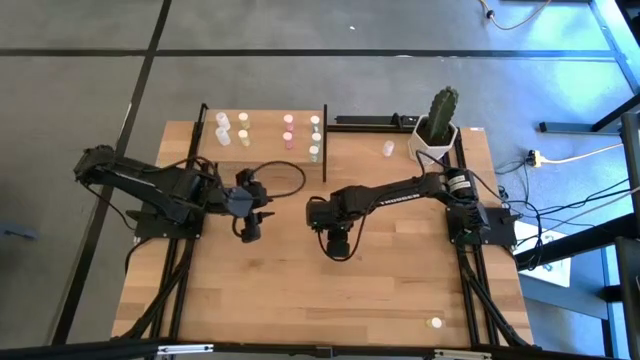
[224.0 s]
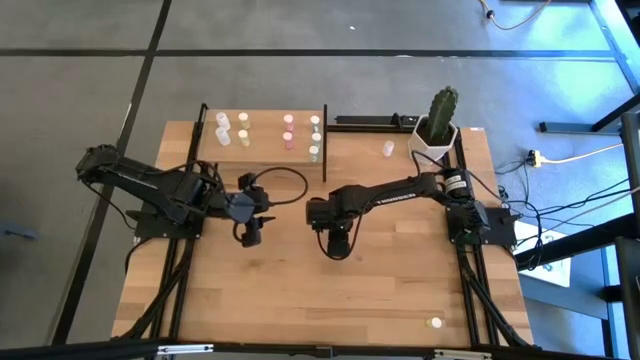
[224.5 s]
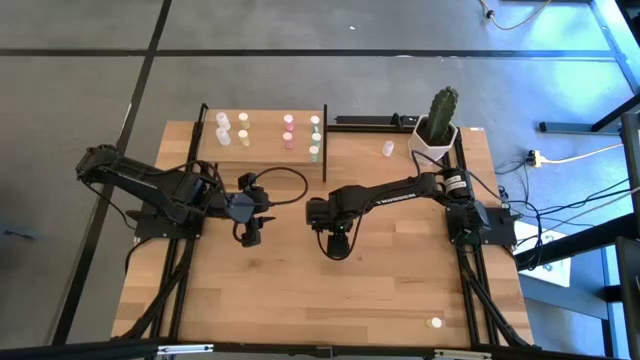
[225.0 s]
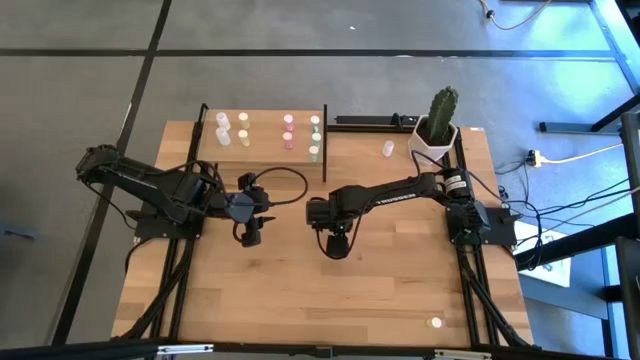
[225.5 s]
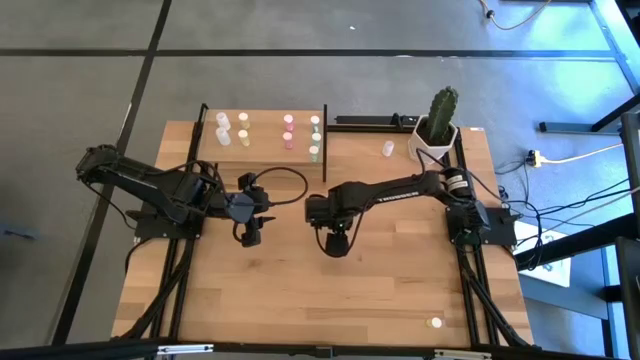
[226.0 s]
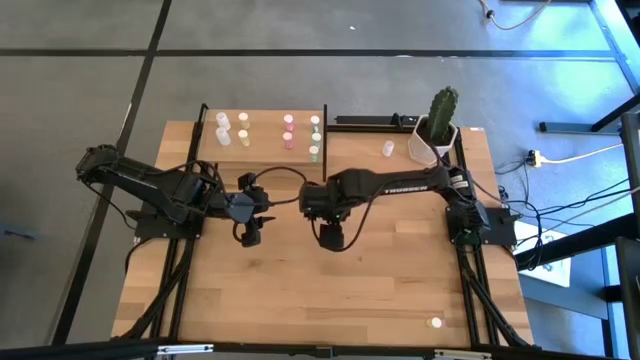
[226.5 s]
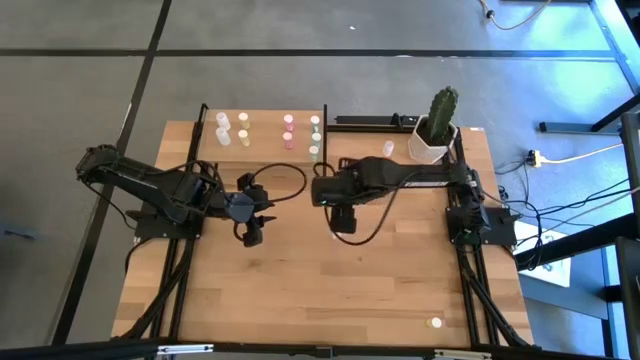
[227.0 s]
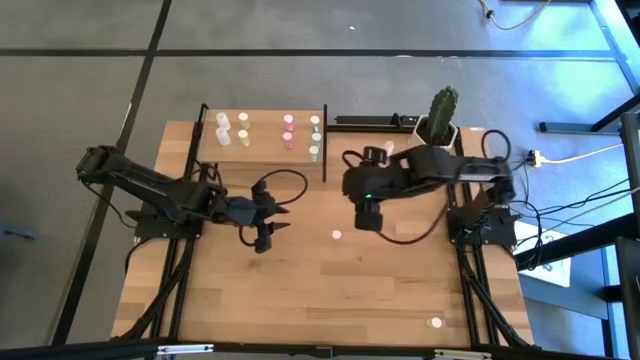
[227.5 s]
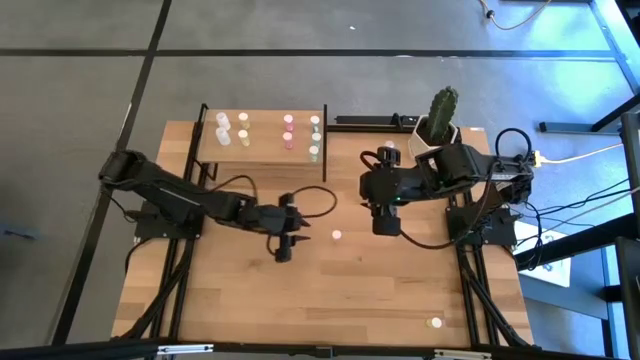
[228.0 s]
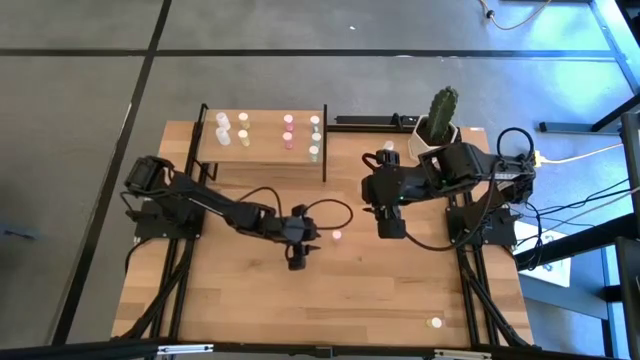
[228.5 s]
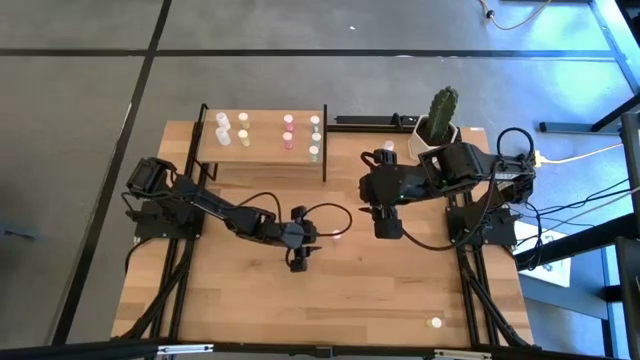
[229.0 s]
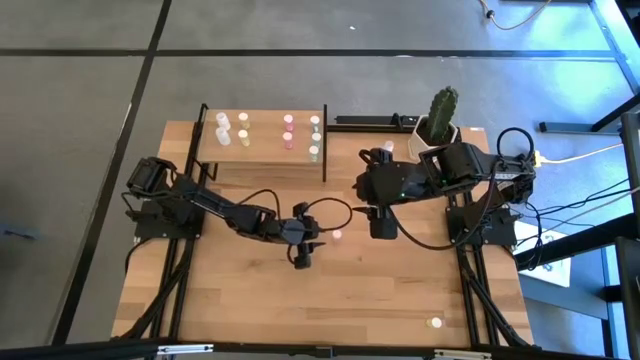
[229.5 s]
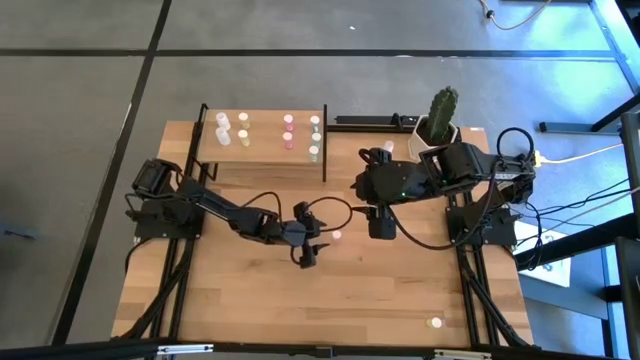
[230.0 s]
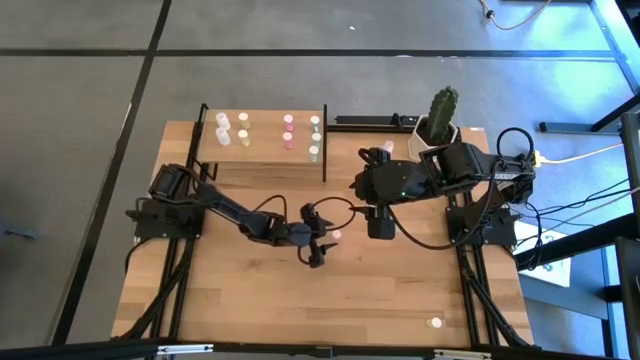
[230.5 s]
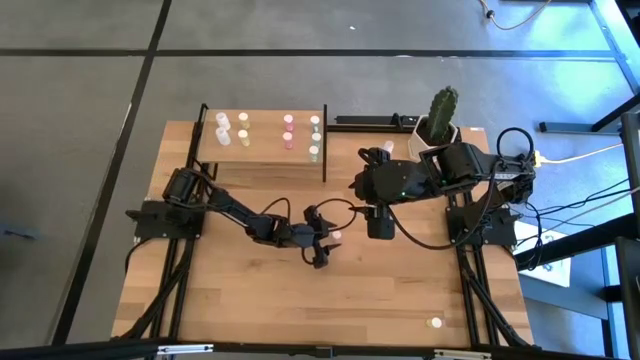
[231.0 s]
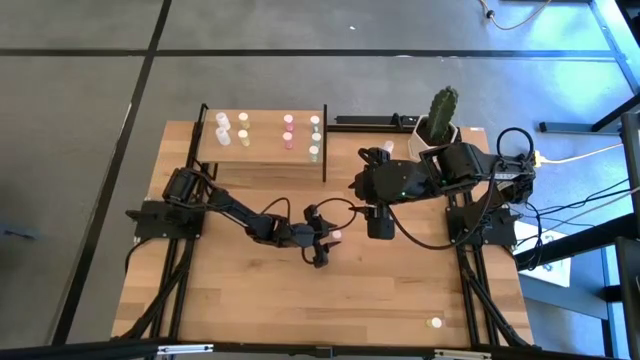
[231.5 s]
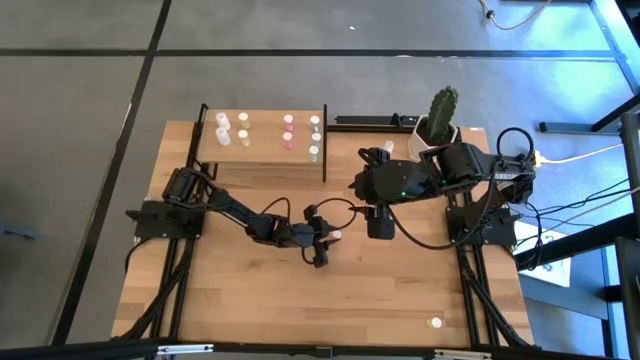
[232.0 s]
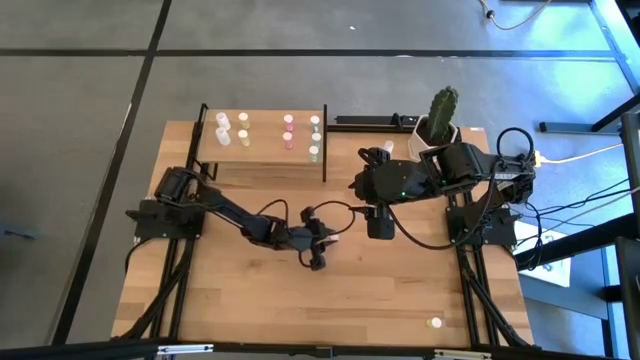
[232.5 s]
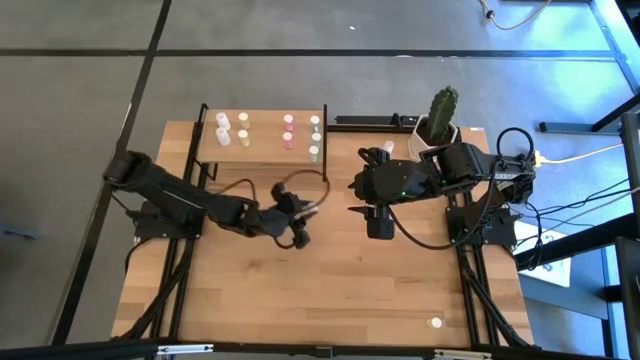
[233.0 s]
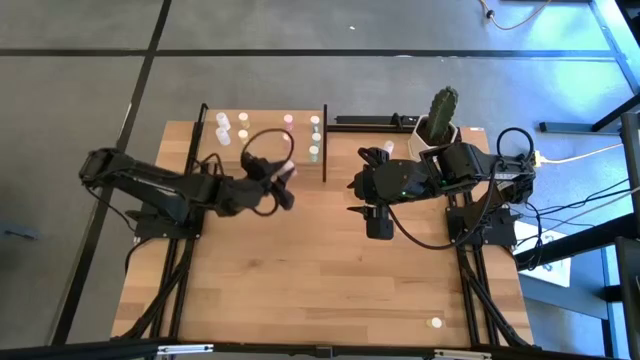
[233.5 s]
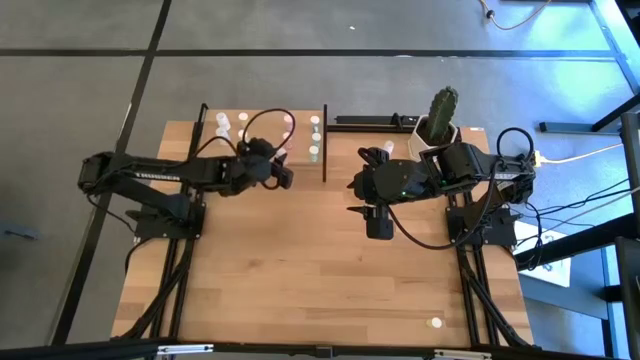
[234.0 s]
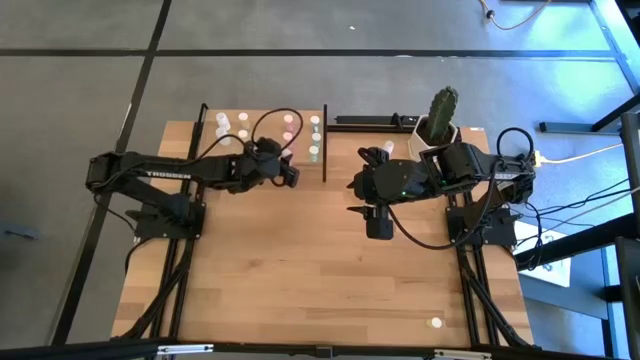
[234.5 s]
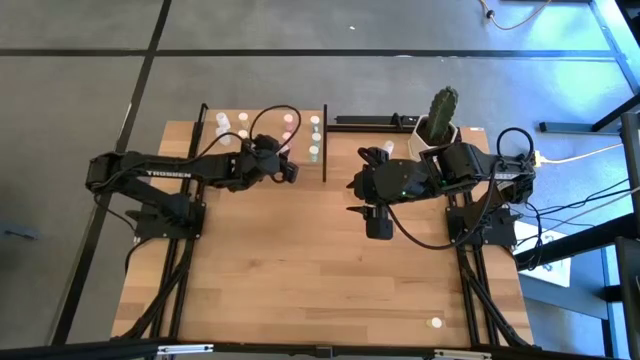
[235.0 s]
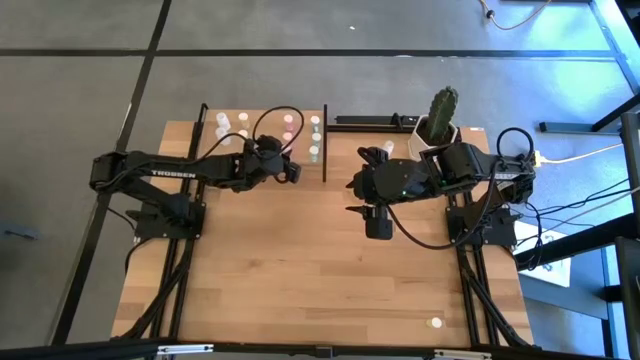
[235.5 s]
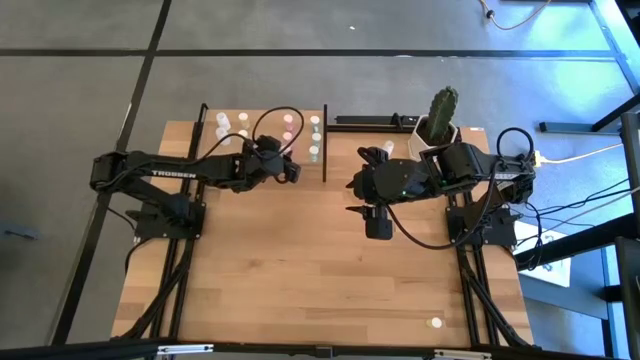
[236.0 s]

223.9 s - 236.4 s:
Task: Pick and place medicine bottles onto shelf by color
Put the pink pill bottle on the shelf and align it with the other pink pill bottles

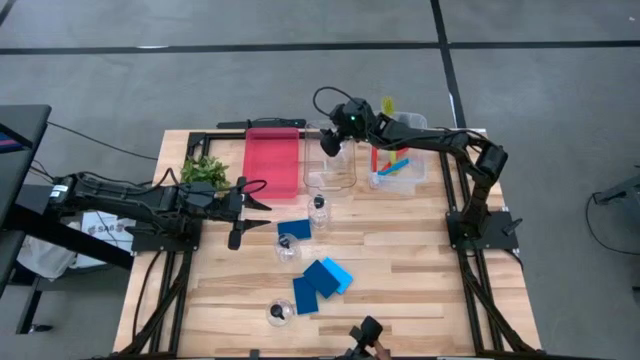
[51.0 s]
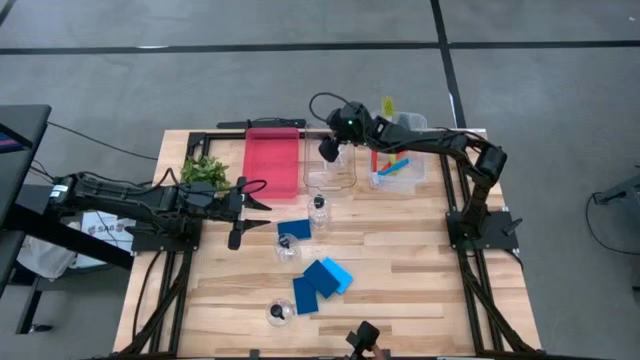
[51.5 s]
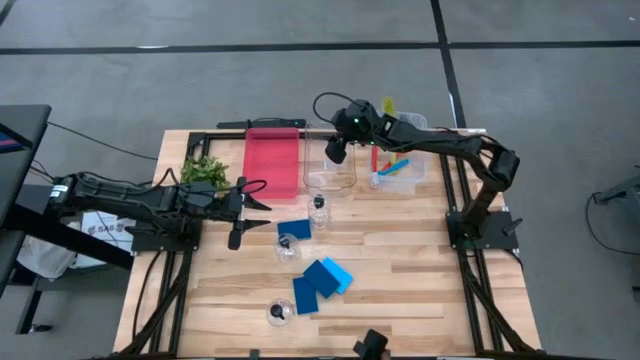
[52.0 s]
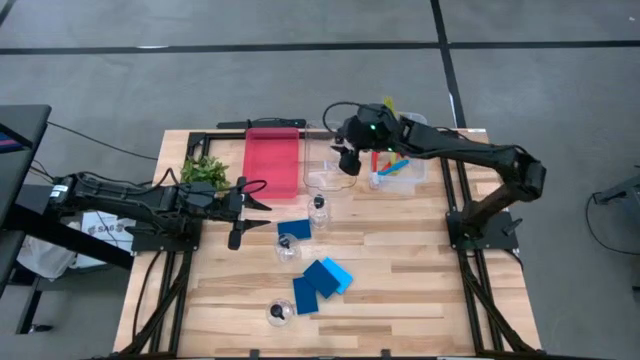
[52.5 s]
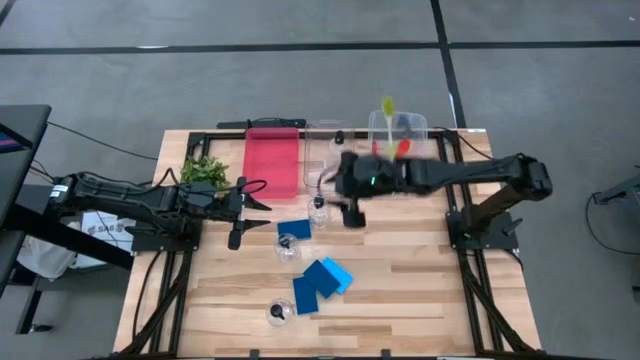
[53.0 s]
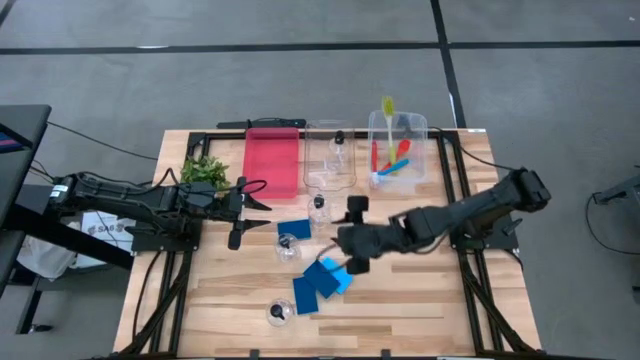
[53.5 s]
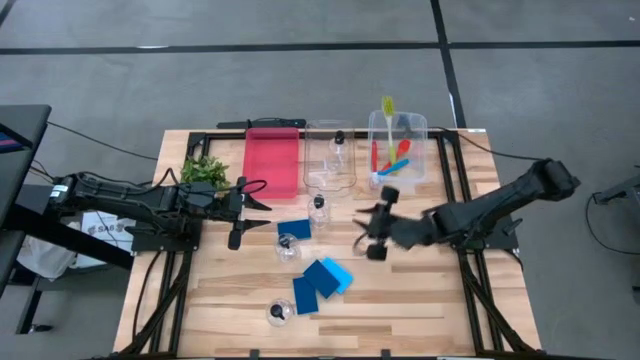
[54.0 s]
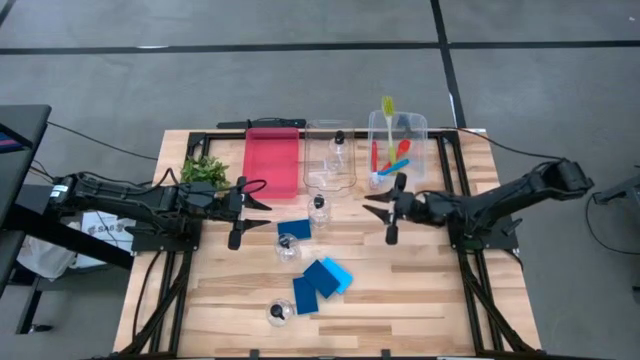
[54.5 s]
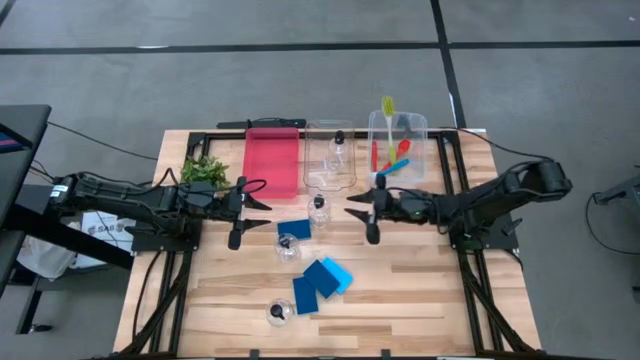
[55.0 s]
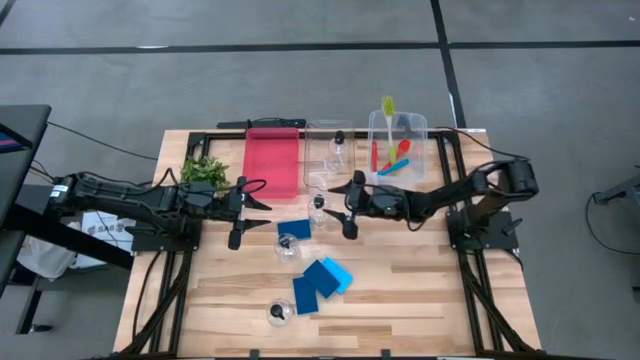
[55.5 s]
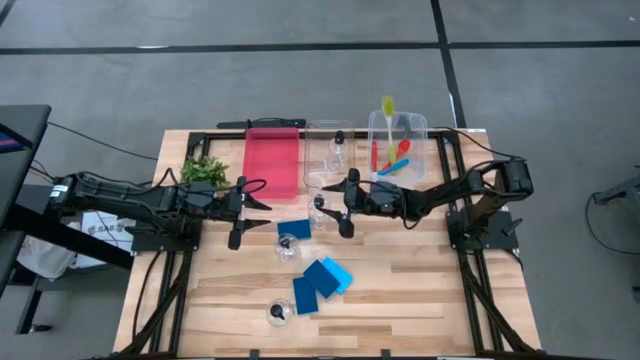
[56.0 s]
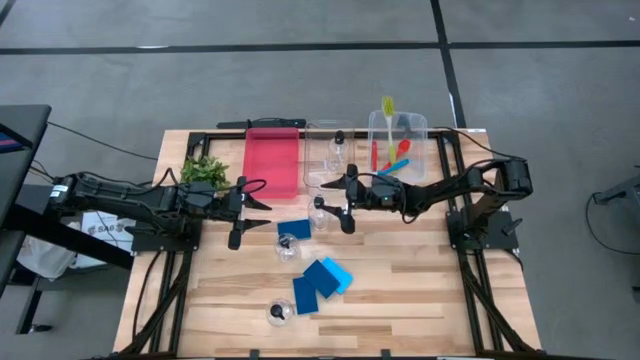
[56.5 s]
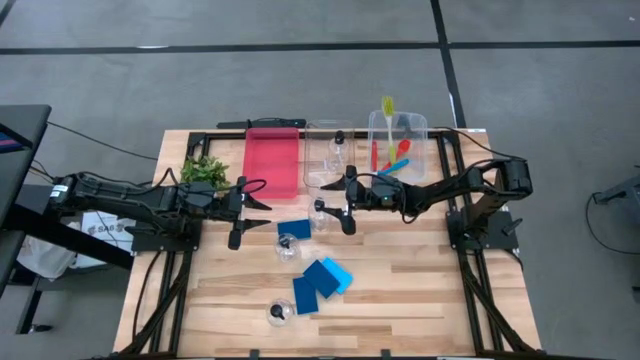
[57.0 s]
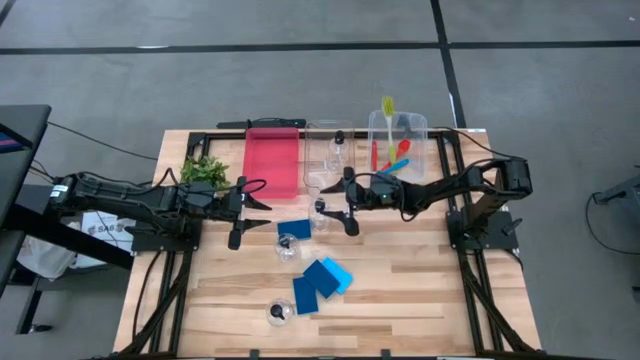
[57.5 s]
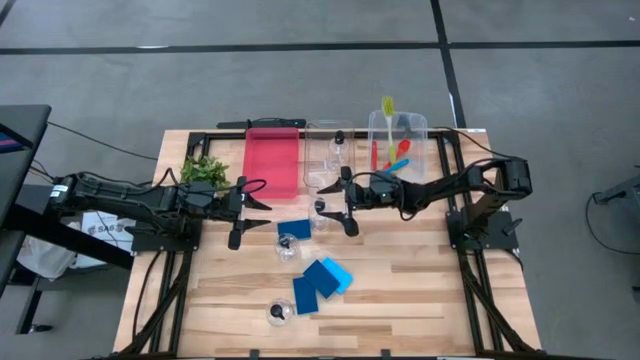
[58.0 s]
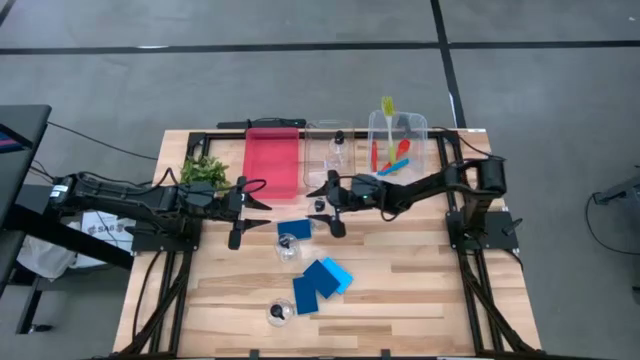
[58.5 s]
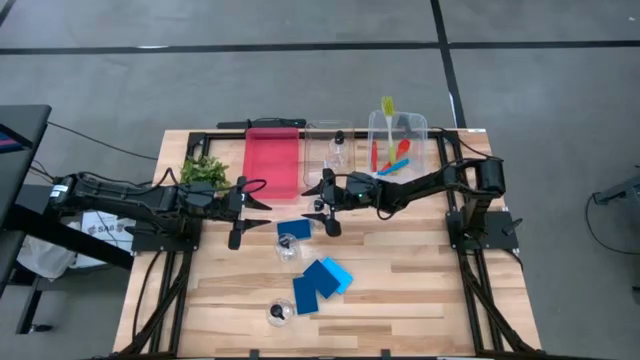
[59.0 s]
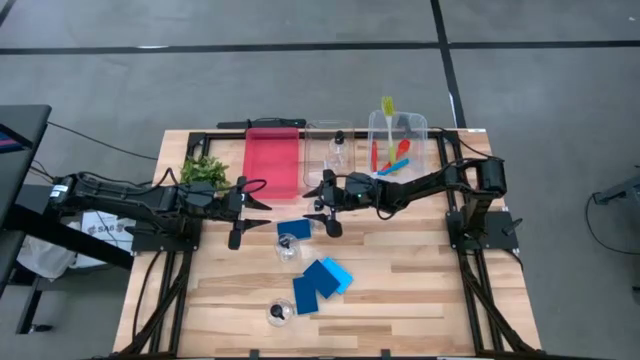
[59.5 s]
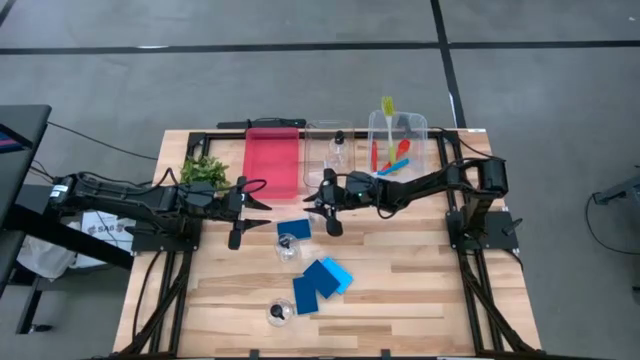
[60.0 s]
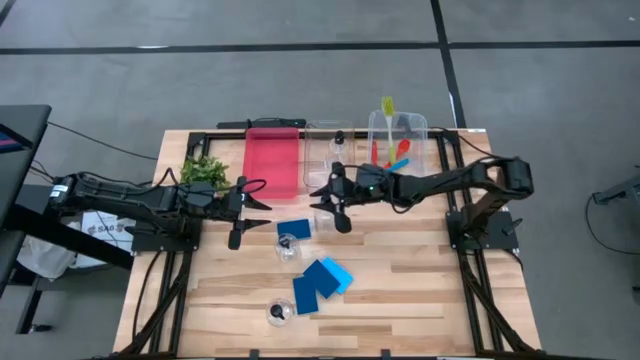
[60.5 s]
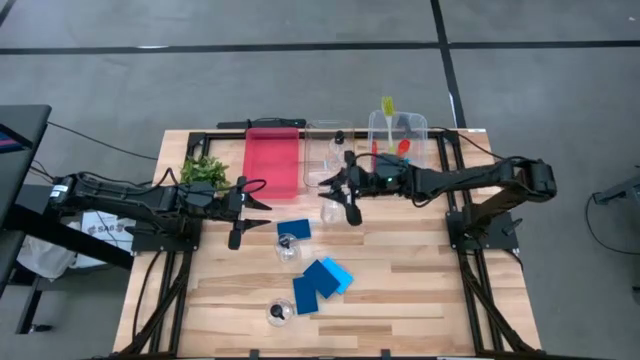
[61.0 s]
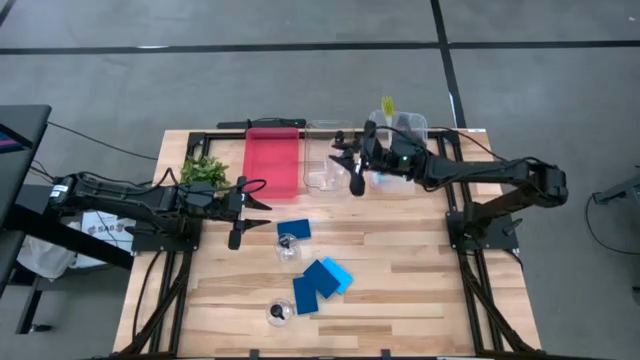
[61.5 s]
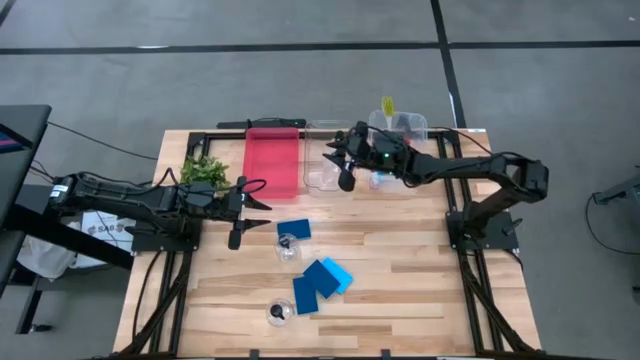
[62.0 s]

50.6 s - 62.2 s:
Task: Pick & Place Kitchen Sink Supplies
Put the soap dispenser into the left transparent bin
